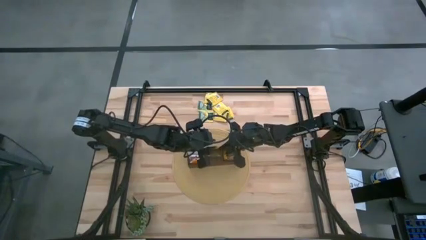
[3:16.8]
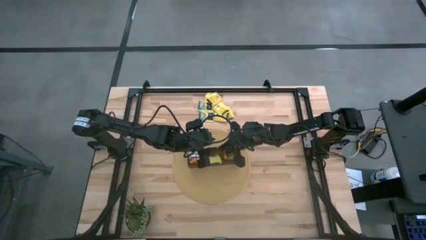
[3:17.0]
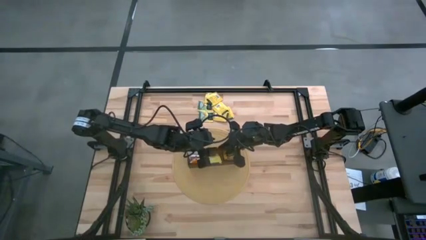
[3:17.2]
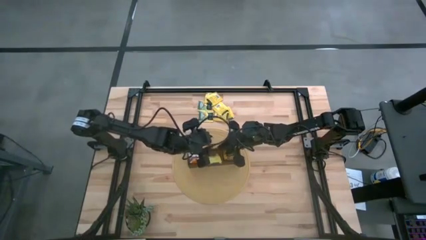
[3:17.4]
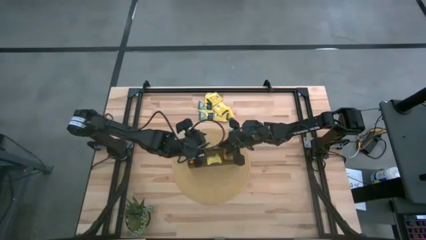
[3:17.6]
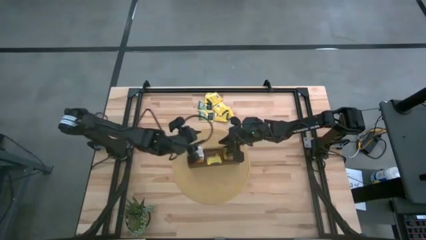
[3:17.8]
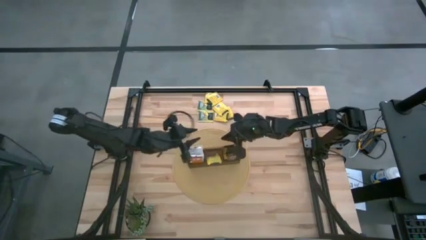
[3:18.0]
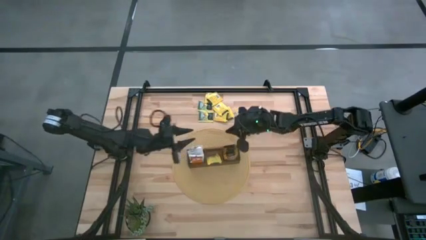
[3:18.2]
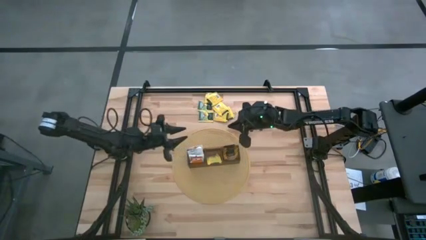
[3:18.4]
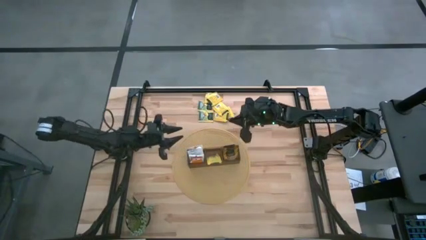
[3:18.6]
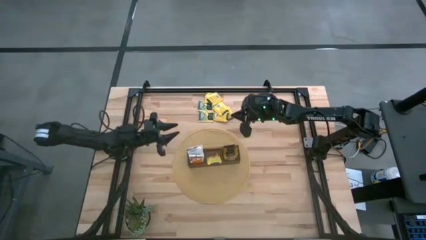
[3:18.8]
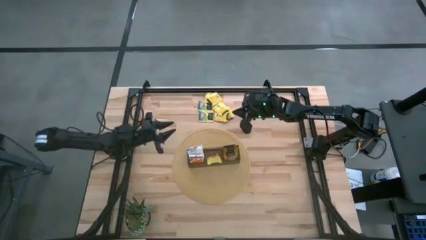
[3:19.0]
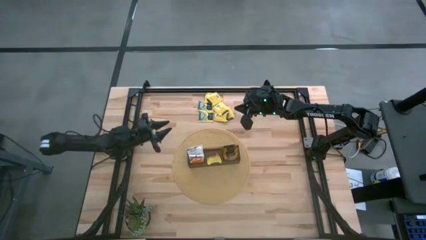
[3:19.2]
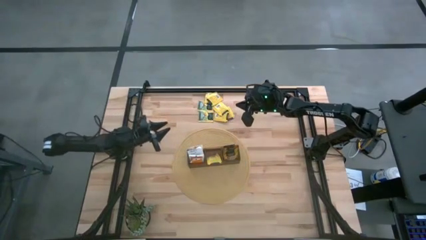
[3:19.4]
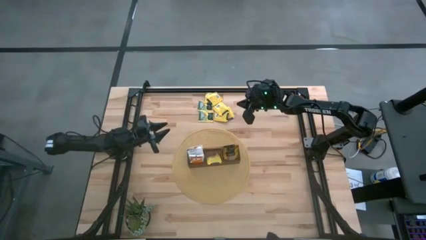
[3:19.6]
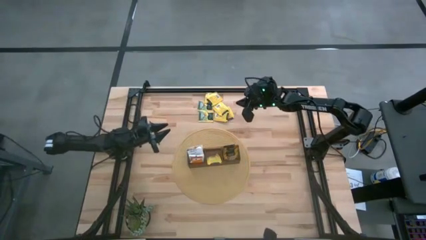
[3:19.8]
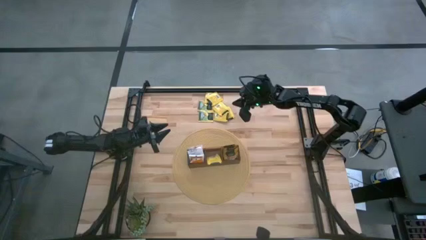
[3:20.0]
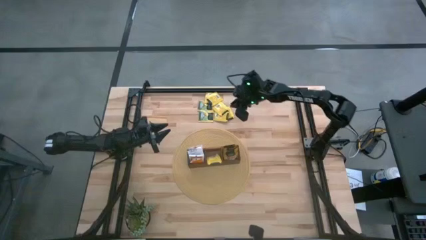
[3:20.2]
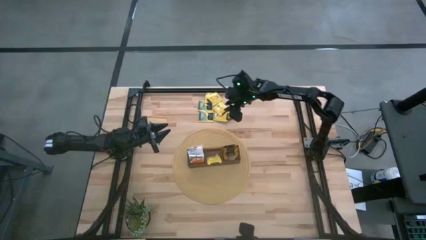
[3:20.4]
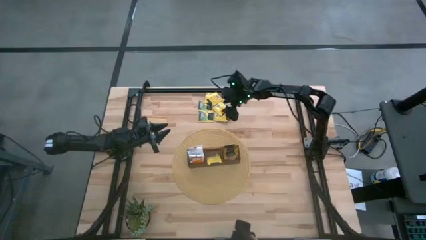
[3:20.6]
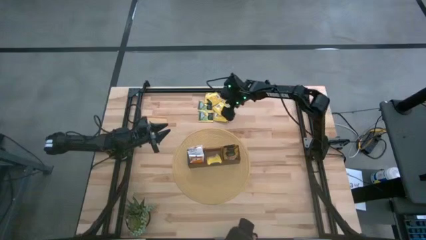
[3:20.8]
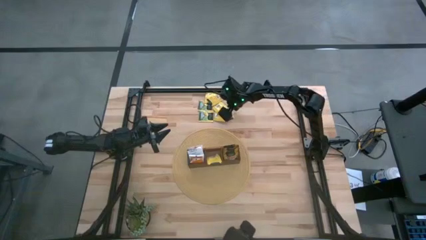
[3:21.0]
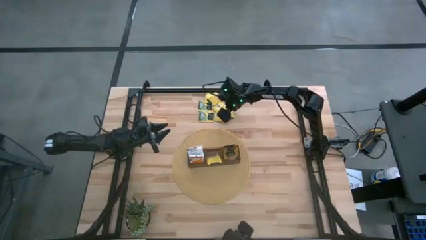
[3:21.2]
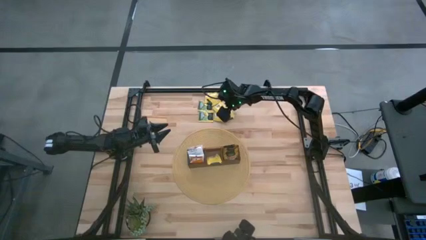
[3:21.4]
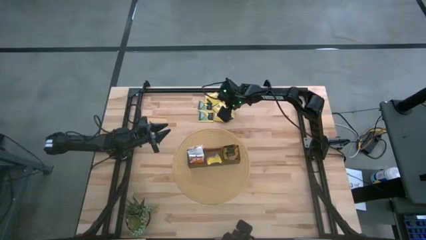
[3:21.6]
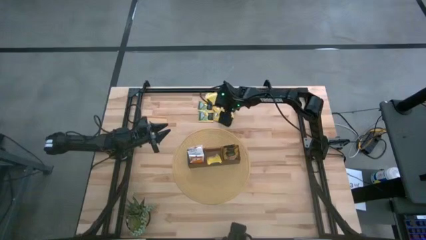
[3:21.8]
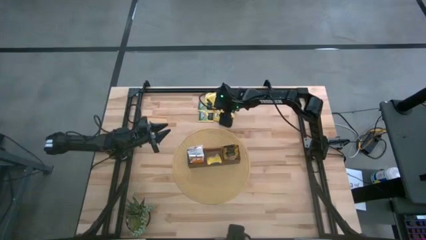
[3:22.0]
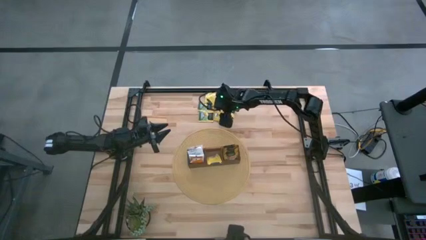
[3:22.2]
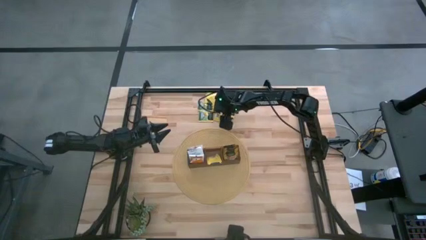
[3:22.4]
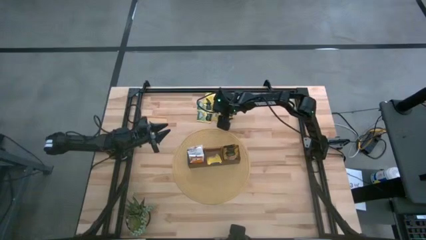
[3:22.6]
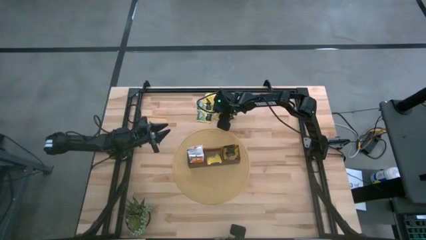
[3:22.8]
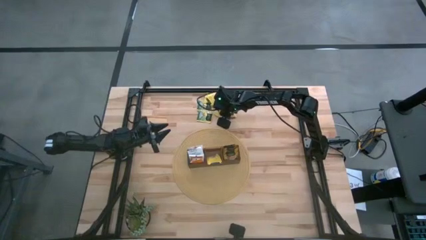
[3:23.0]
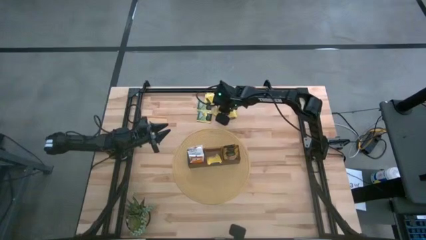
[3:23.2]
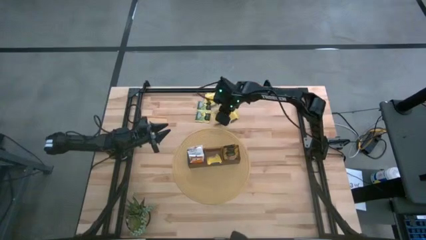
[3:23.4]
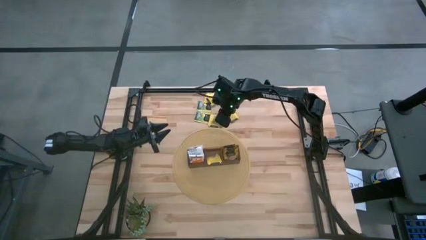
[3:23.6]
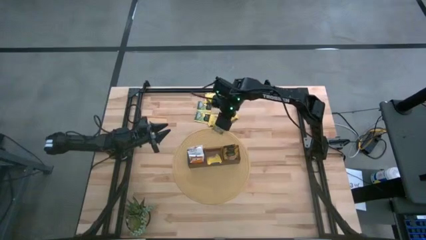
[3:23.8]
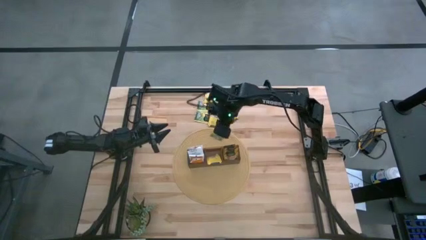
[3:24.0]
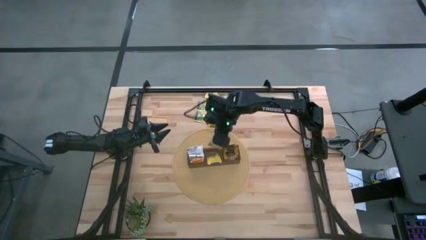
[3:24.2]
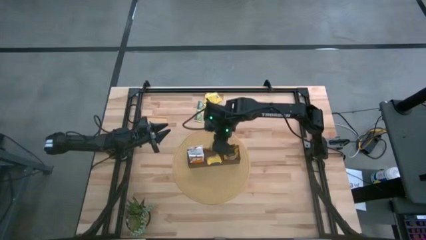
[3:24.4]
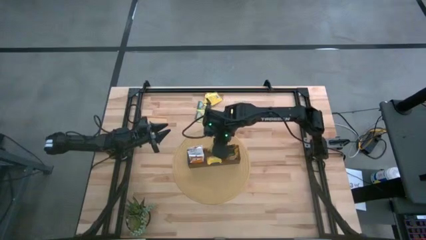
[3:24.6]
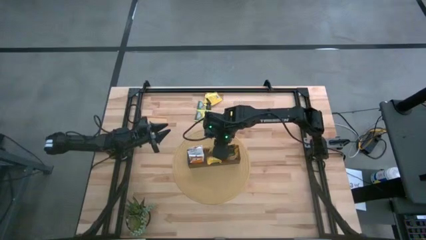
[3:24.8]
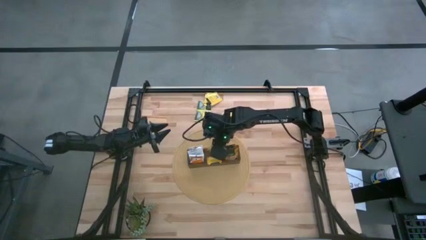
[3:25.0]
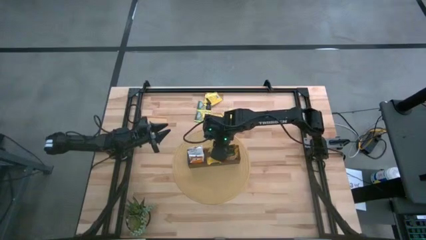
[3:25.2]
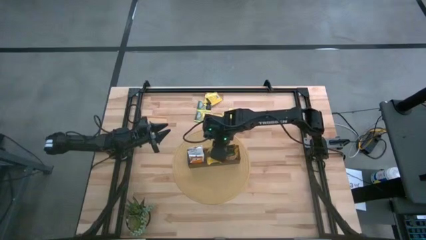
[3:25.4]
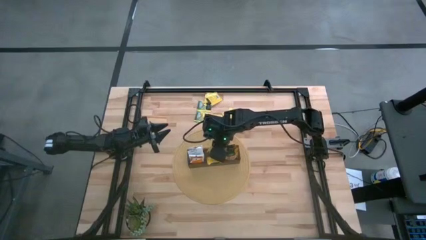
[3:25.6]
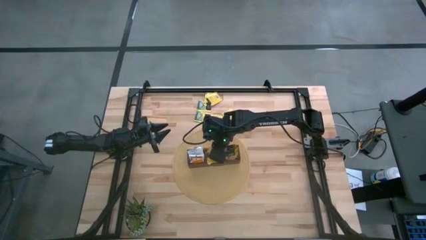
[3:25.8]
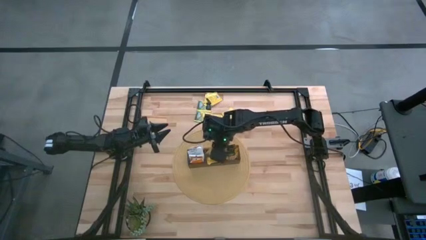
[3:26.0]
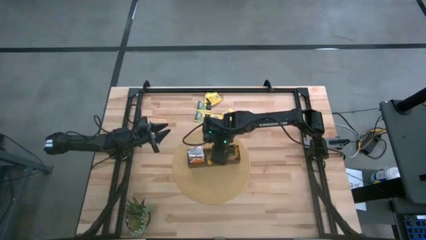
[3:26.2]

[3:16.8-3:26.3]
Task: Pick & Place Tea
Put the yellow tea bag into the wooden organizer

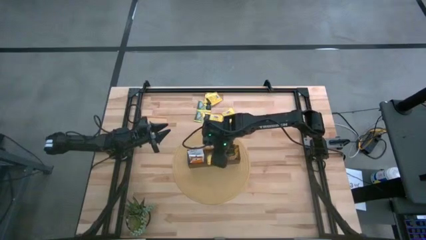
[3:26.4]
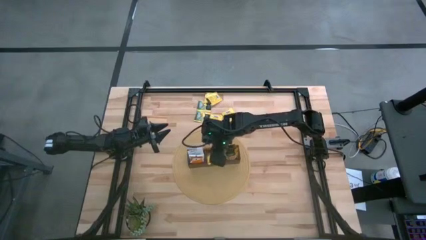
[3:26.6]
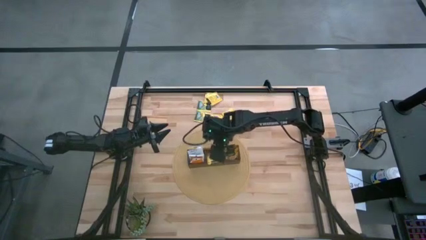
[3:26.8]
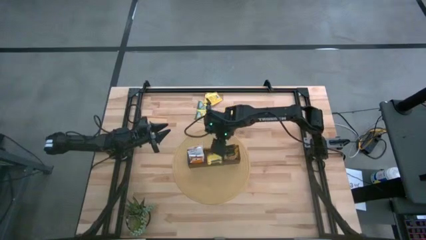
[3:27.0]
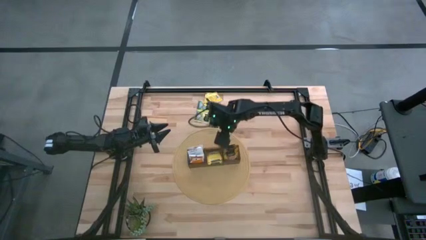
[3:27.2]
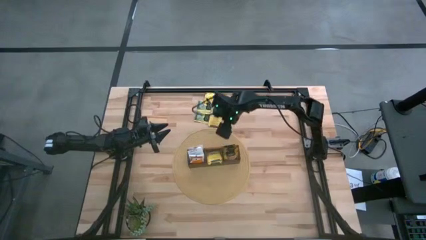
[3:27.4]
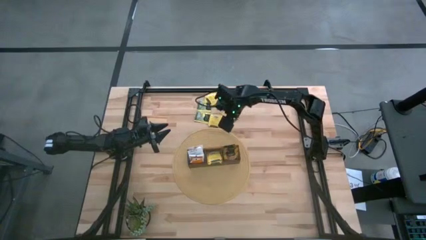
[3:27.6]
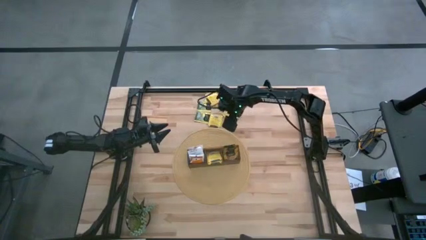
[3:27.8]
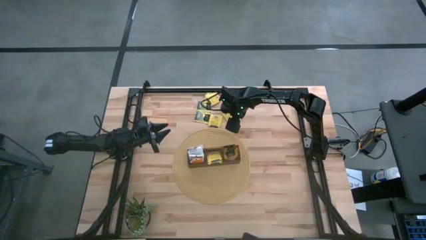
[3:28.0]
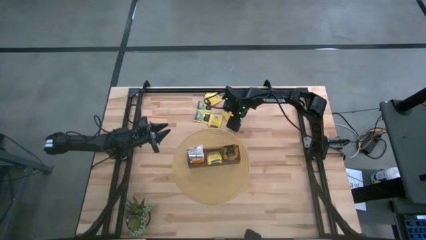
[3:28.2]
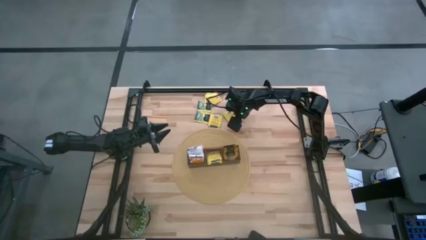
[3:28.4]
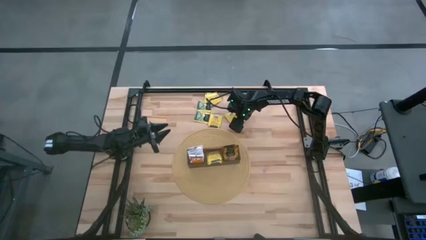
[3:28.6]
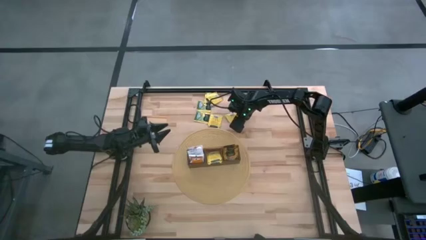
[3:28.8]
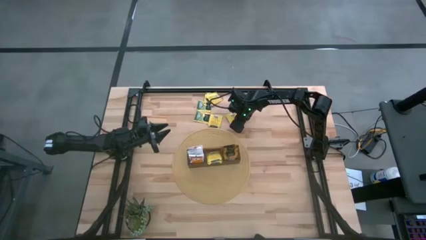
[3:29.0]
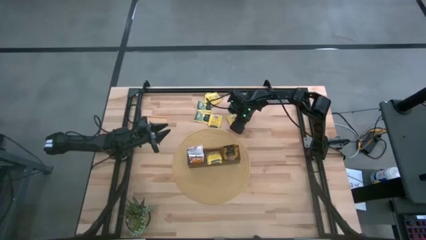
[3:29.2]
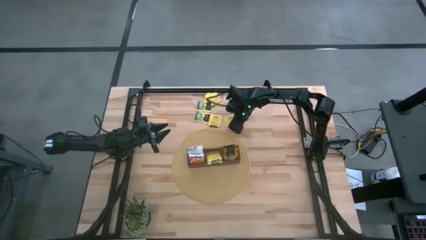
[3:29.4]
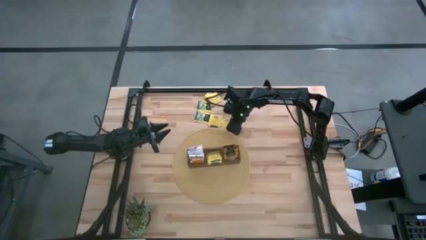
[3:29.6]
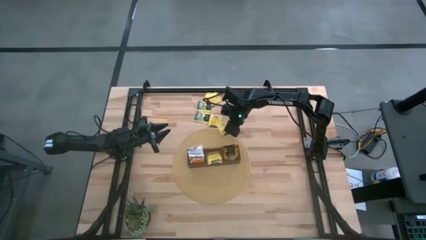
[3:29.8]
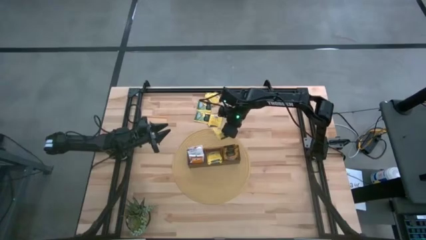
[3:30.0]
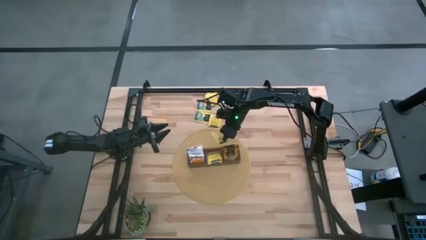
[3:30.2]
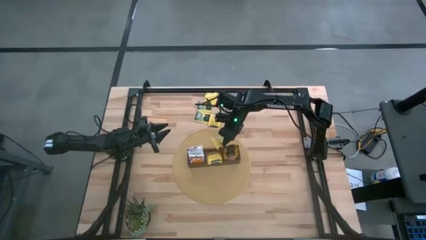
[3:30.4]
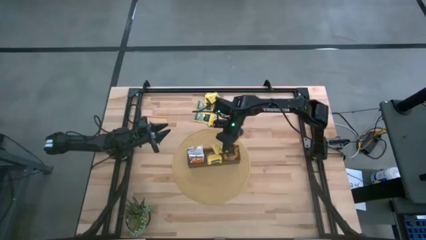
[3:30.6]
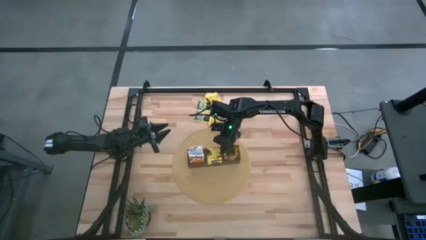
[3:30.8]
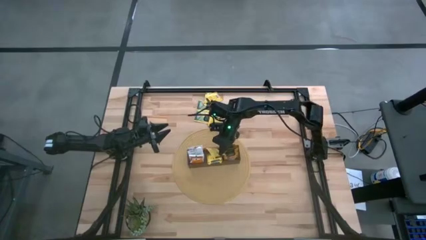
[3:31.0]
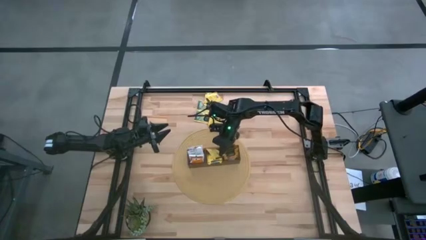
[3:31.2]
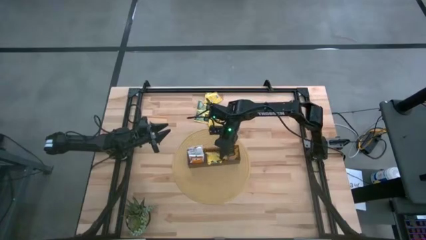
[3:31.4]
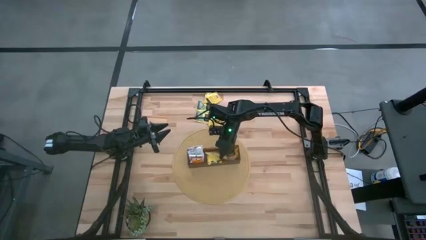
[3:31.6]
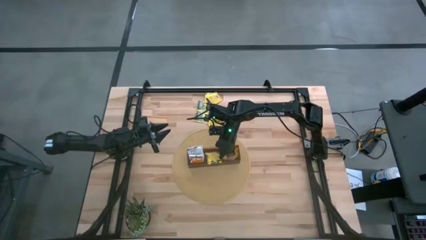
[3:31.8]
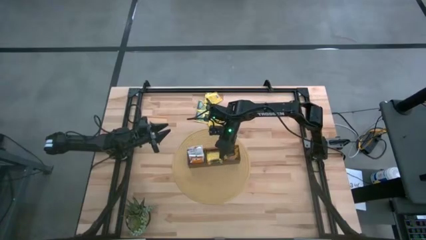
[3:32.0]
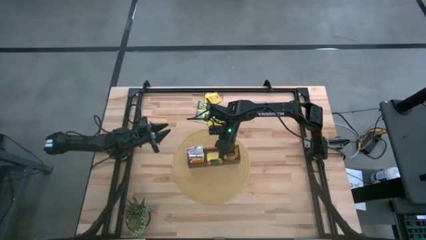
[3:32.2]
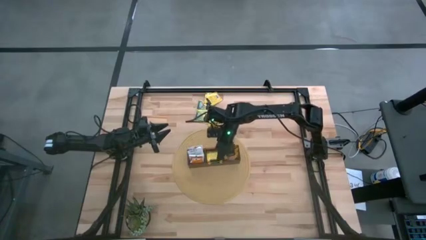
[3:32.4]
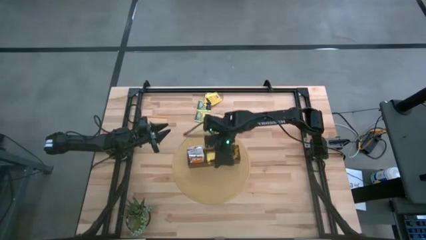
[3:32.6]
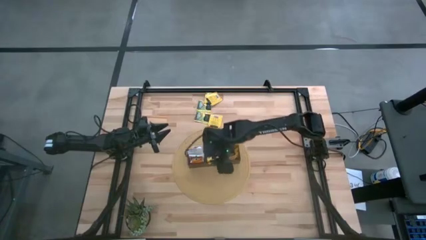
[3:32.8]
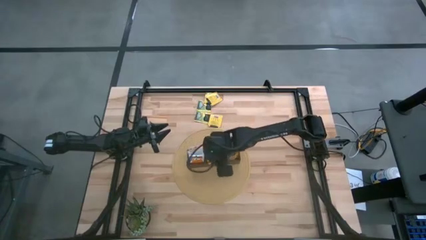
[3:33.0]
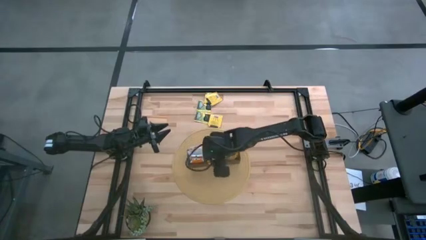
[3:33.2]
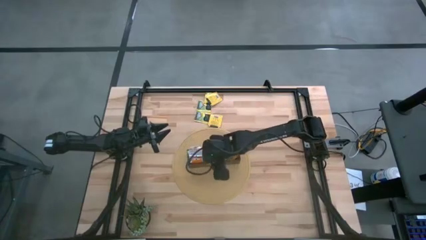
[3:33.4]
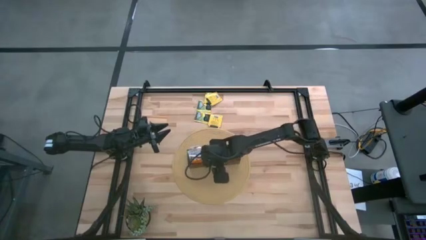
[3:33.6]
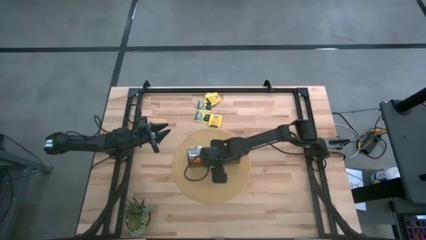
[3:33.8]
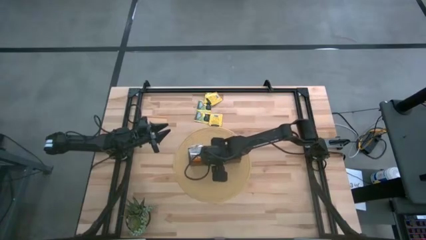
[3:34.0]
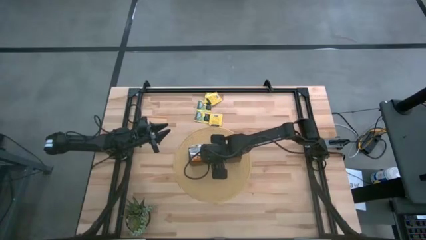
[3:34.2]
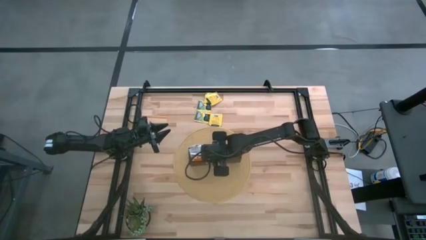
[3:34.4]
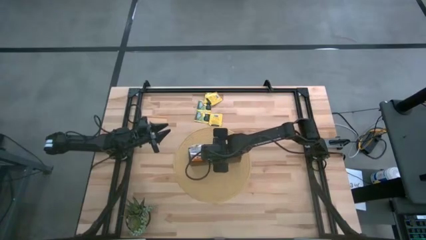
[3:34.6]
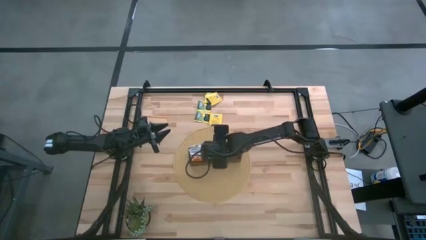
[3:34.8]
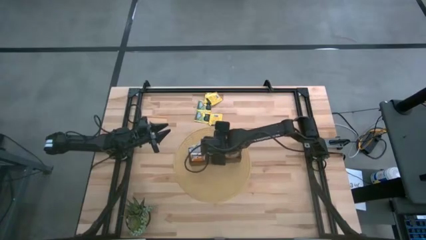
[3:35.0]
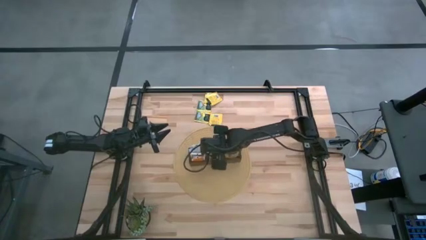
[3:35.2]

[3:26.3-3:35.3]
Put the yellow tea bag into the wooden organizer
